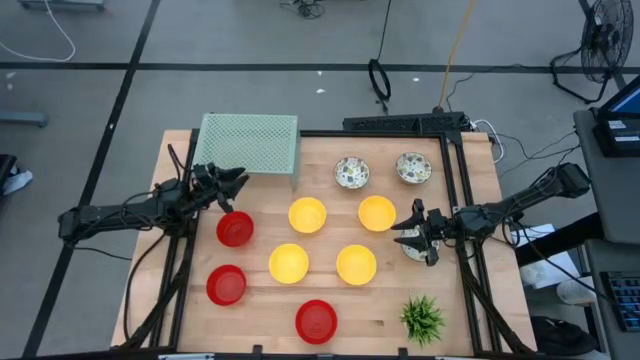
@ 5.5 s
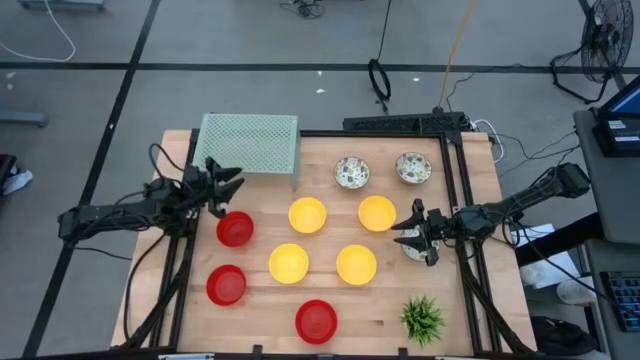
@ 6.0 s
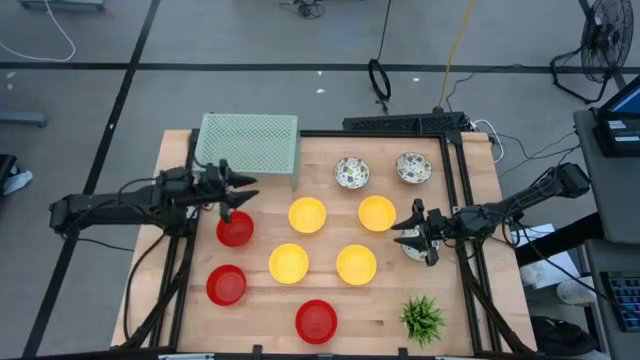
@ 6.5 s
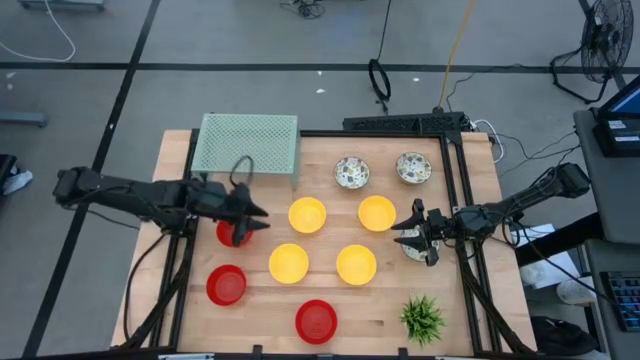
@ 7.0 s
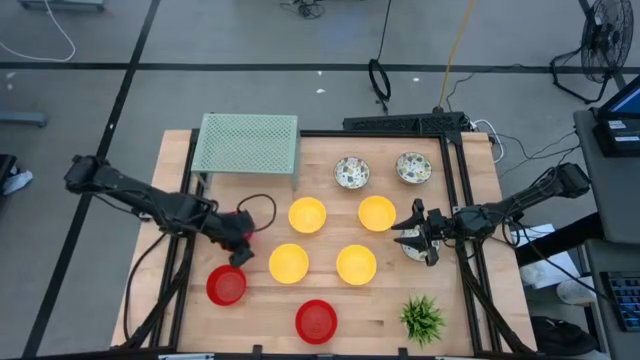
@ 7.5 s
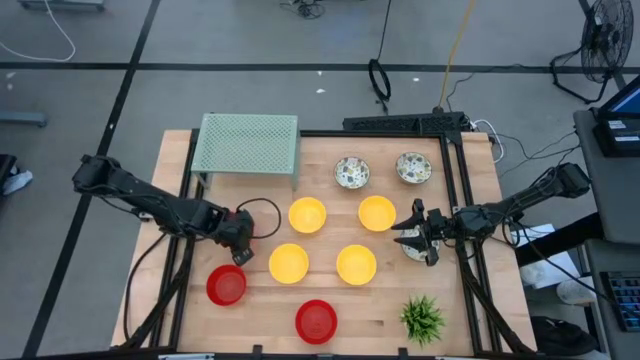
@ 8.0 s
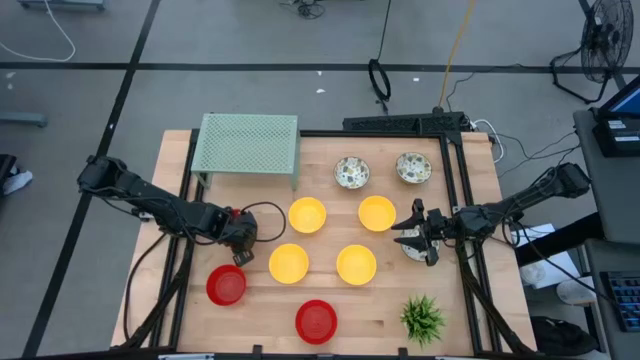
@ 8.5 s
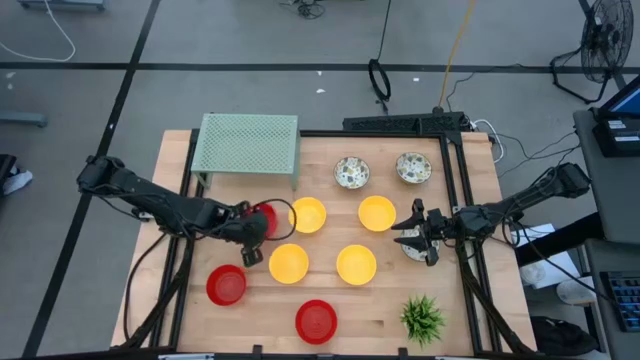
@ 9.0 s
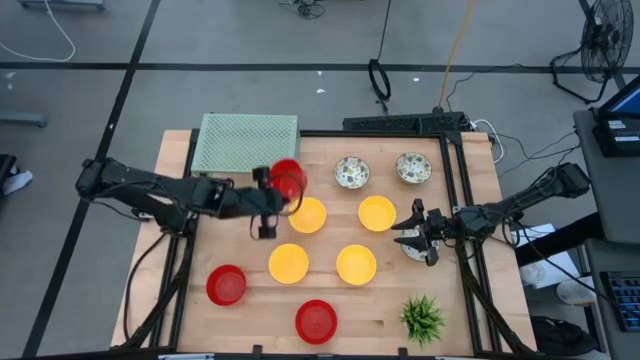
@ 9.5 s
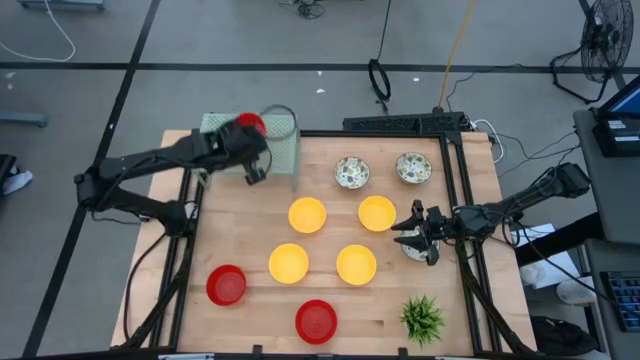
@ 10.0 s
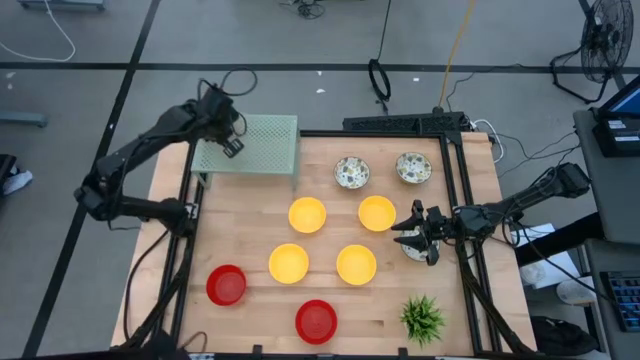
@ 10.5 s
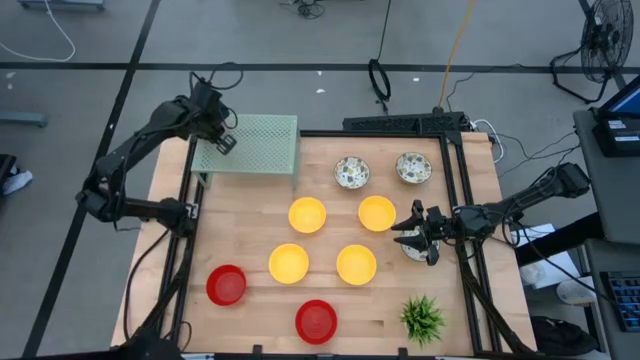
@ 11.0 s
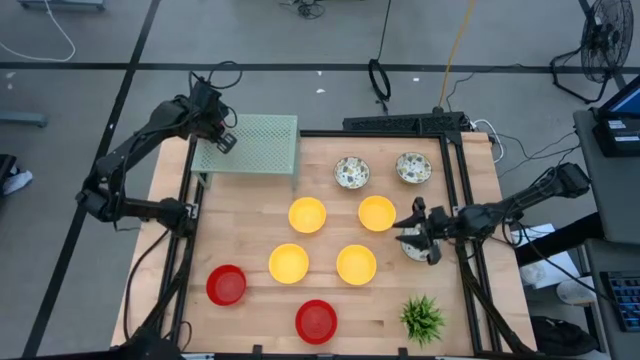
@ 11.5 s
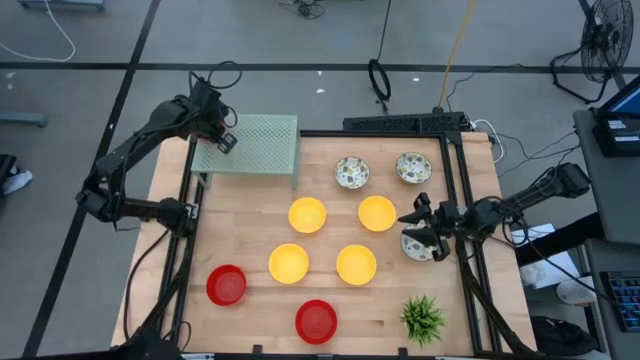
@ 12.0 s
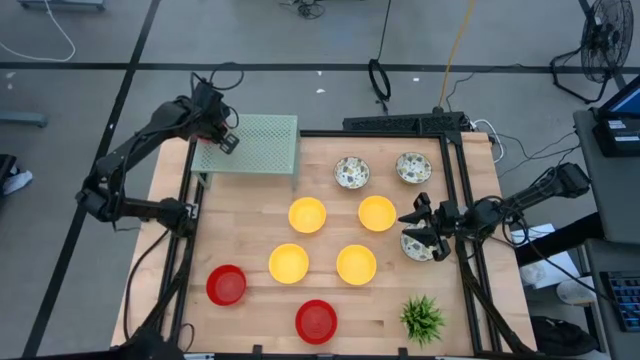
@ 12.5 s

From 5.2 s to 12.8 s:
Task: Pick & Place Mini bowls
Put the red bowl on the shelf

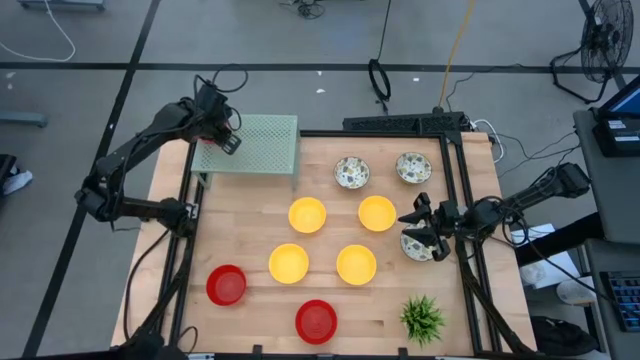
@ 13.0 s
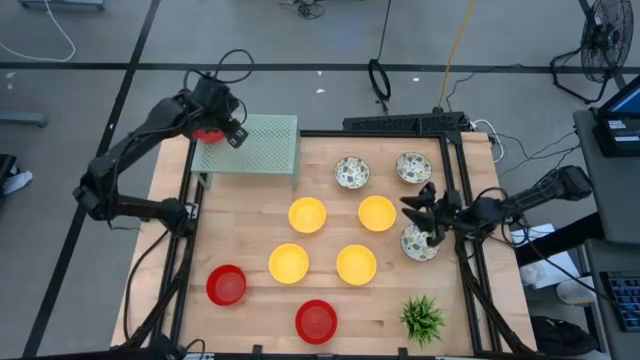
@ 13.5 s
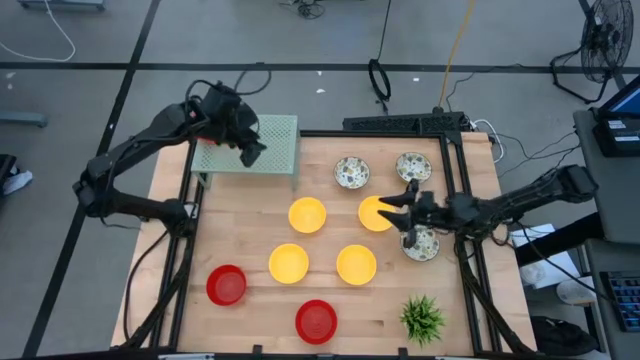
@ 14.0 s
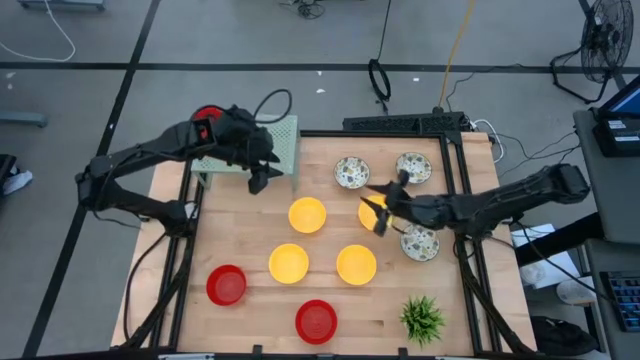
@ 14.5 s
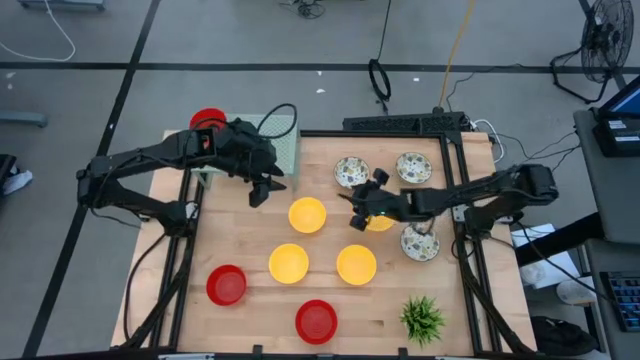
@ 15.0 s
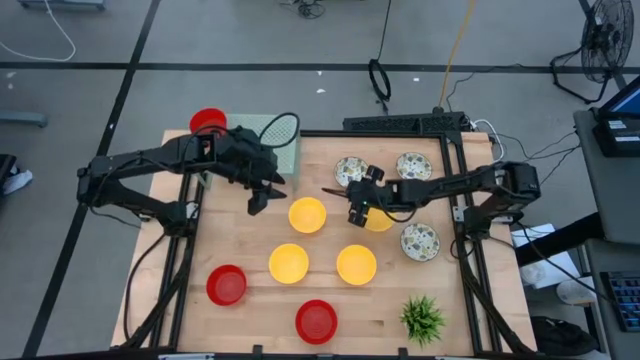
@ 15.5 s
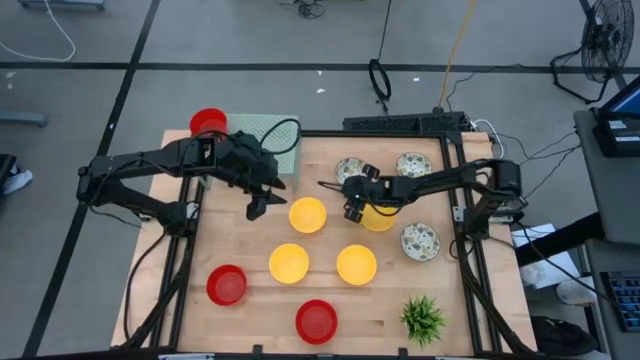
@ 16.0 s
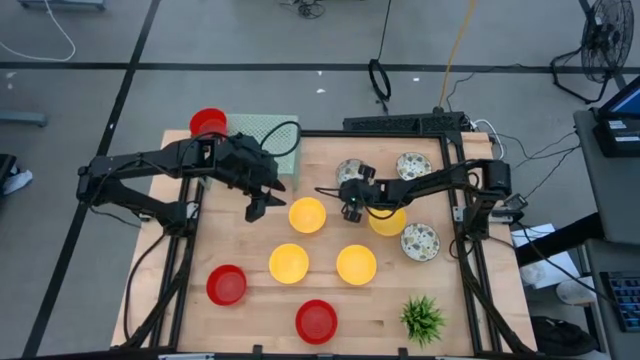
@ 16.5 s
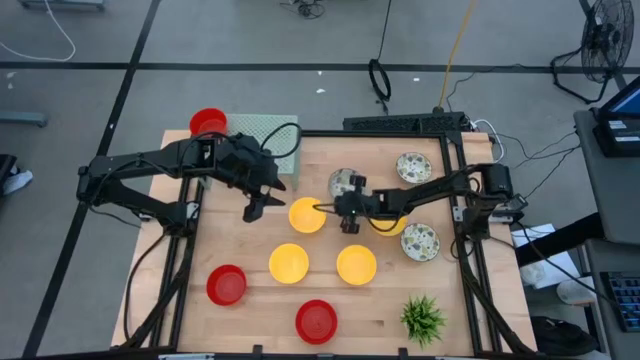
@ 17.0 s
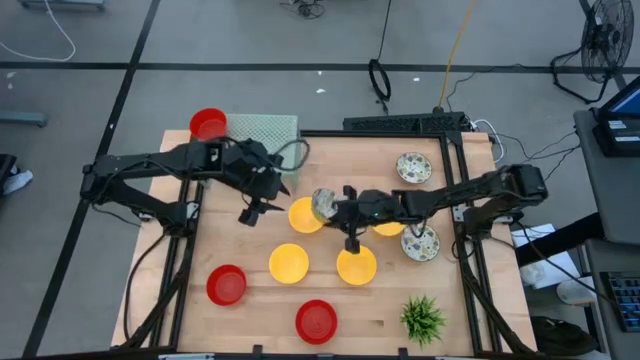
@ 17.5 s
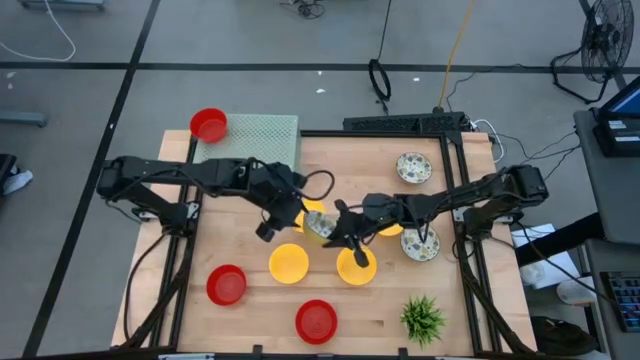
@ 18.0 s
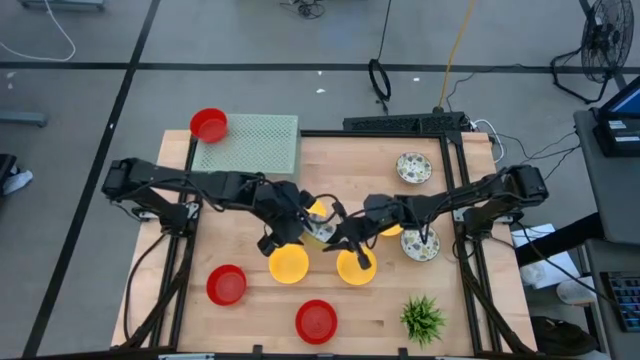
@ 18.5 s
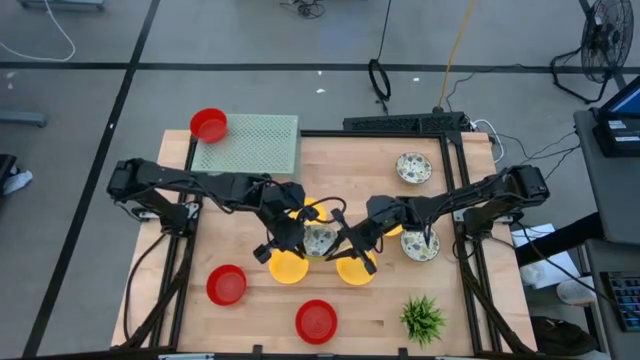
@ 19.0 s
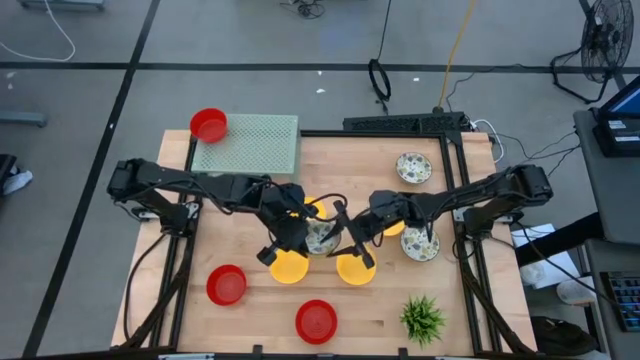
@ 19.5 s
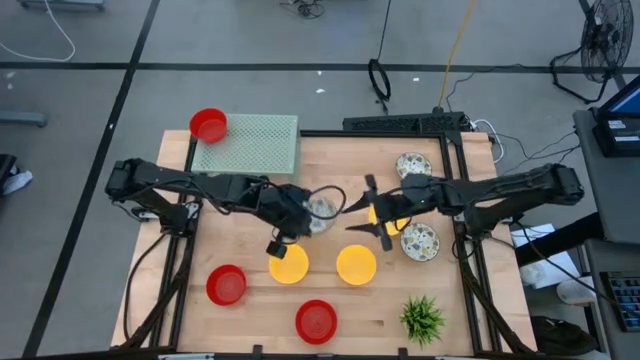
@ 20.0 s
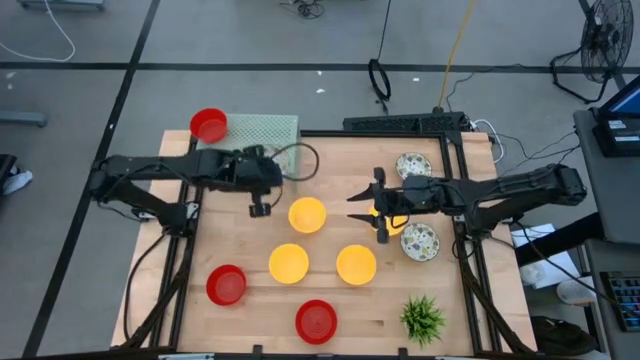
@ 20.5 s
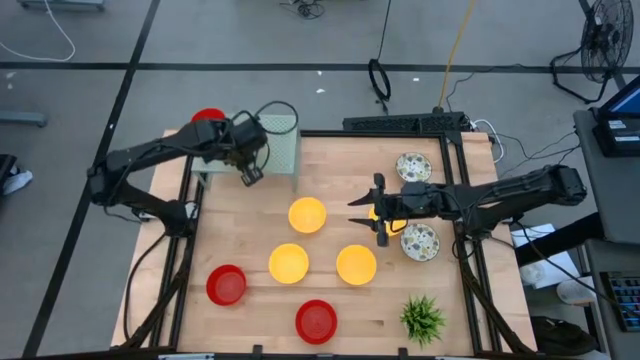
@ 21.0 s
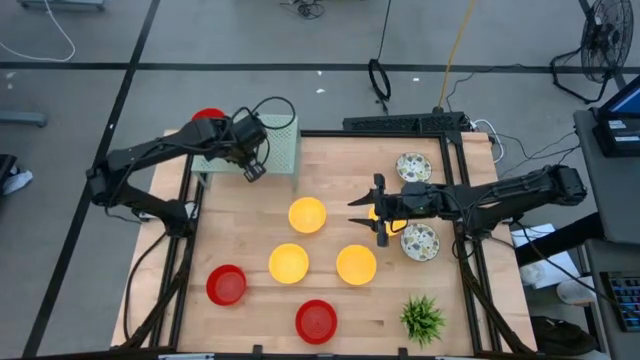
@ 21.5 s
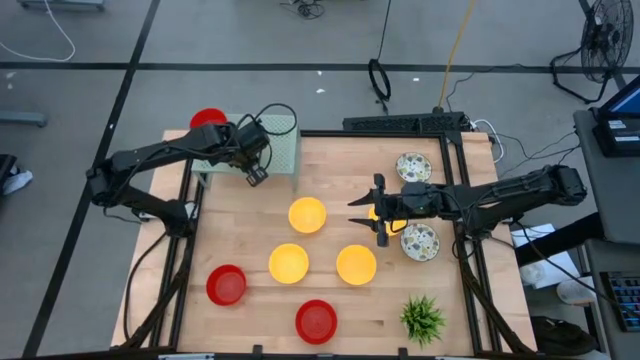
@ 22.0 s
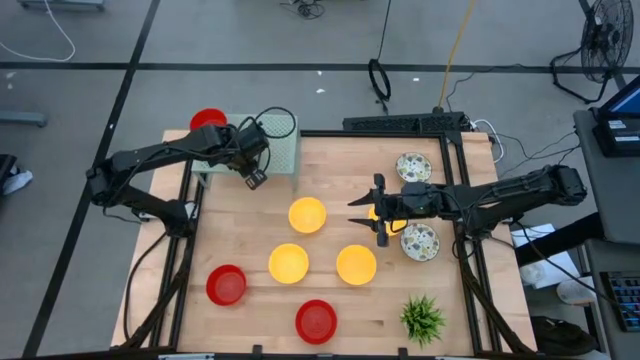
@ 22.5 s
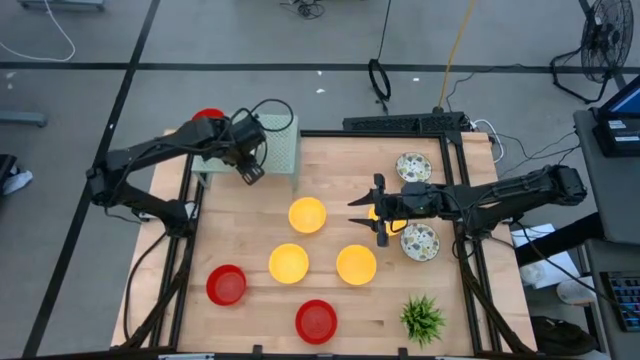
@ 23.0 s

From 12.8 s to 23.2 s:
Put the white patterned bowl on the shelf

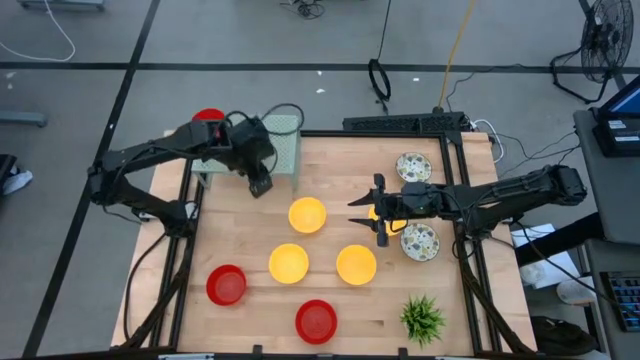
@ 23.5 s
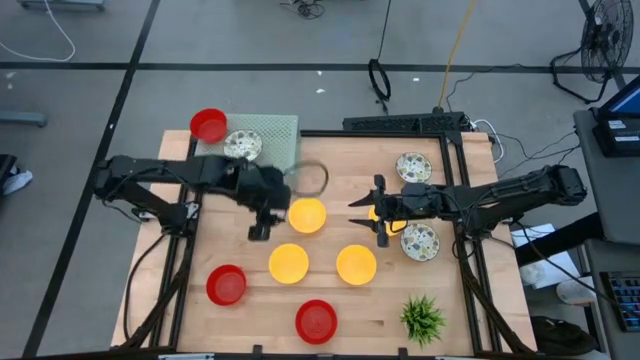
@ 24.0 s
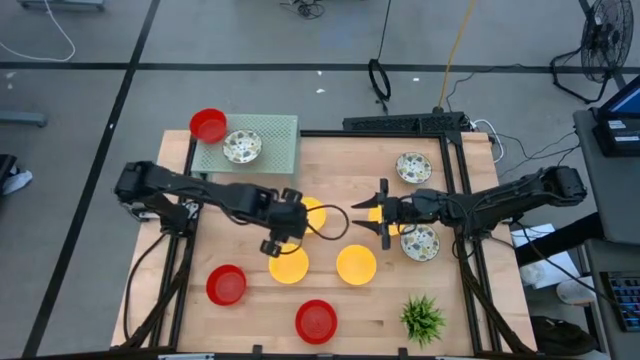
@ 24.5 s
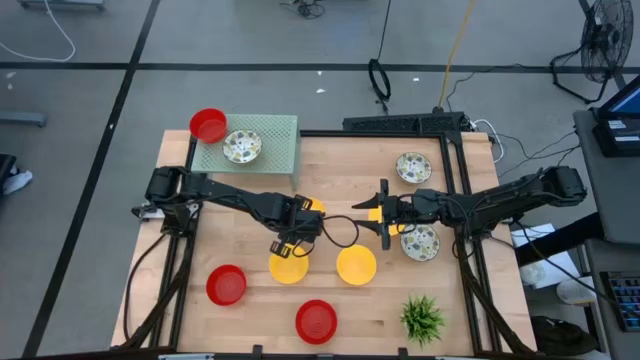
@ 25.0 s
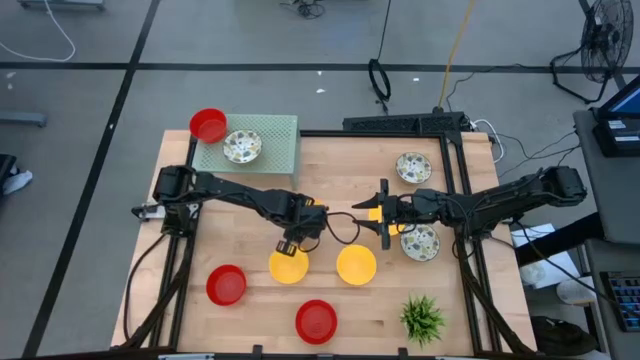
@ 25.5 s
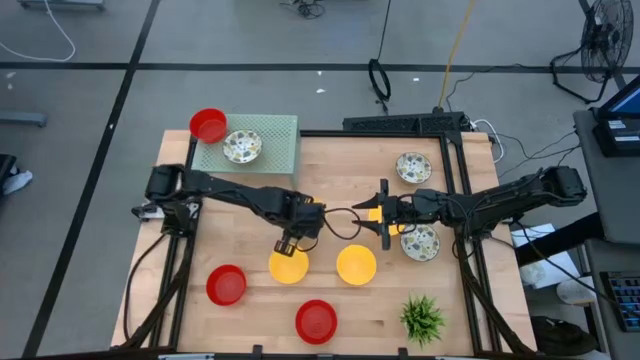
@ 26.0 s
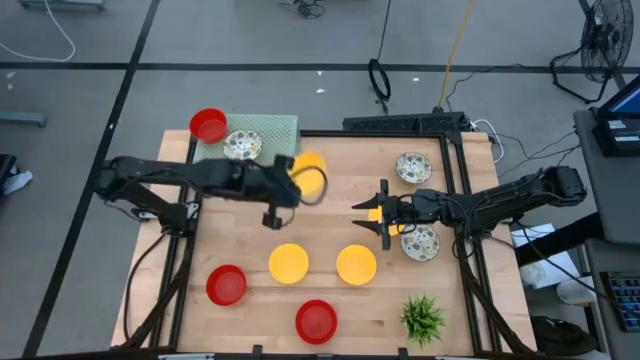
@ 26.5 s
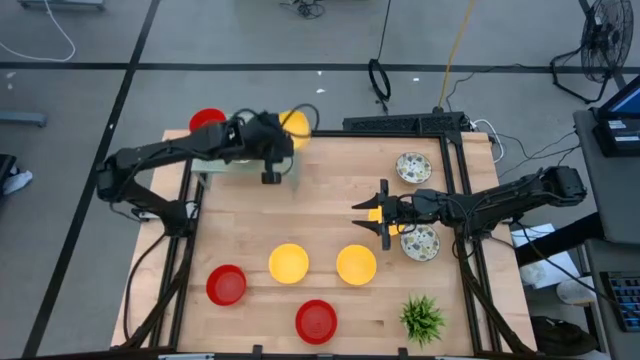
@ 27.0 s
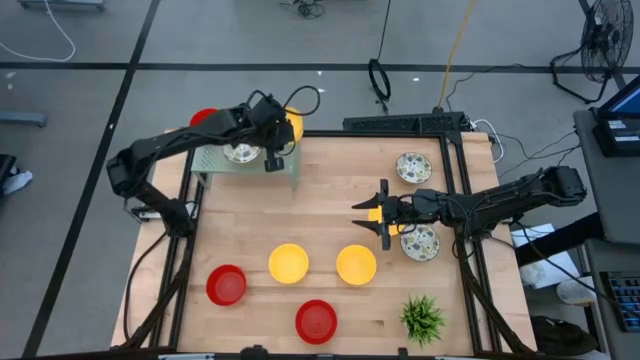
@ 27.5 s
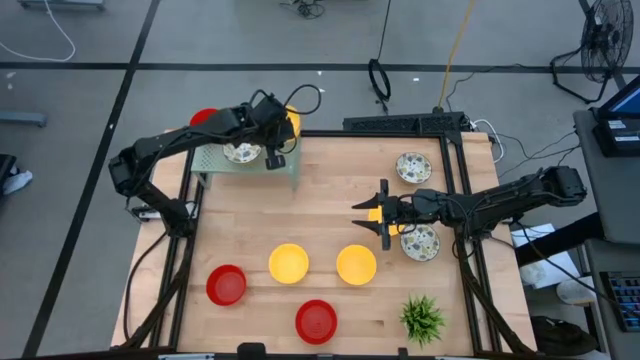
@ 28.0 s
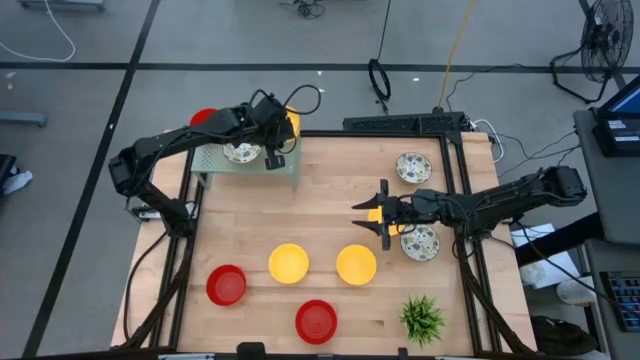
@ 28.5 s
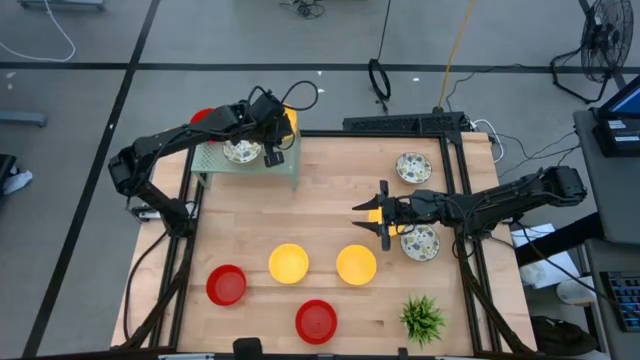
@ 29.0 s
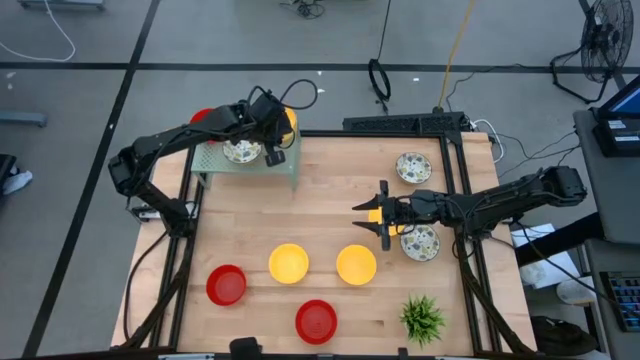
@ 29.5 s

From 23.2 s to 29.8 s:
Put the yellow bowl on the shelf
